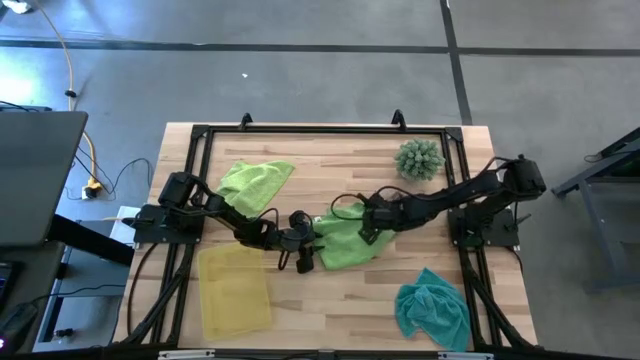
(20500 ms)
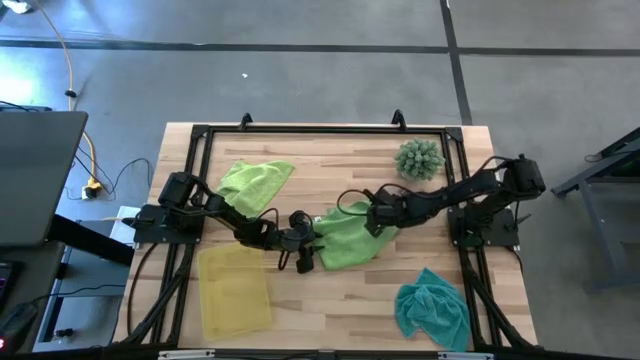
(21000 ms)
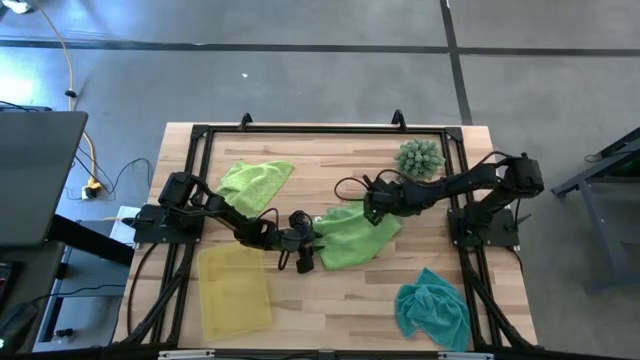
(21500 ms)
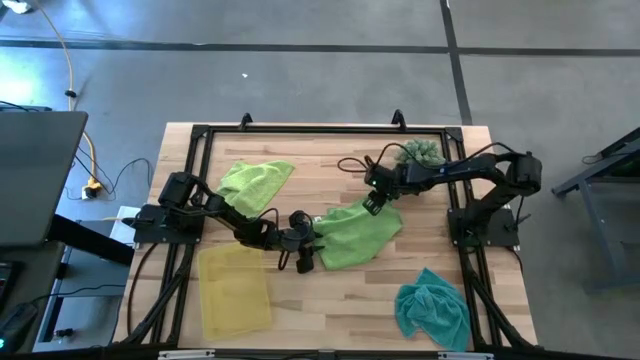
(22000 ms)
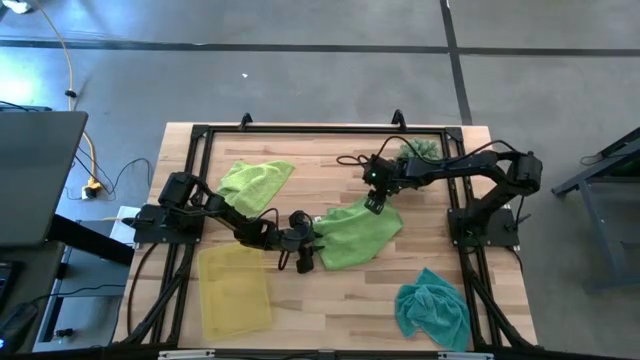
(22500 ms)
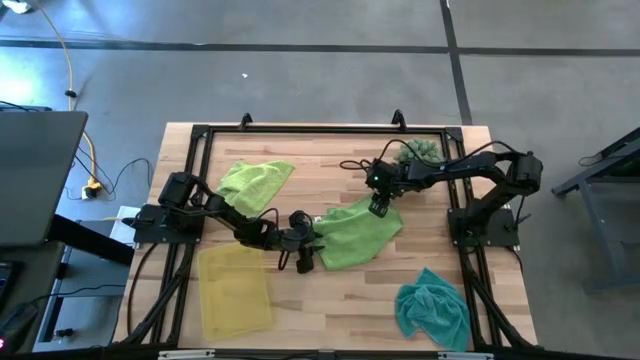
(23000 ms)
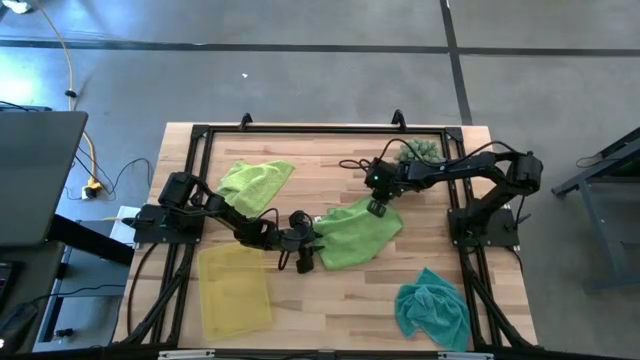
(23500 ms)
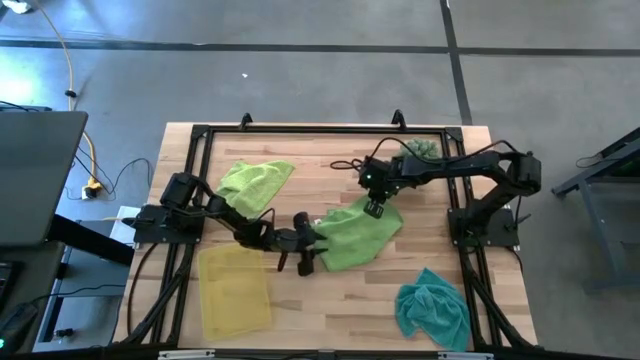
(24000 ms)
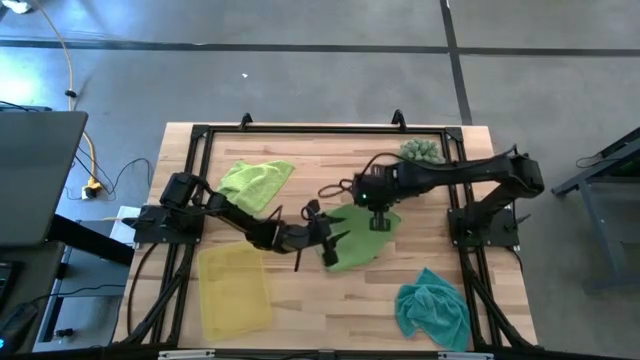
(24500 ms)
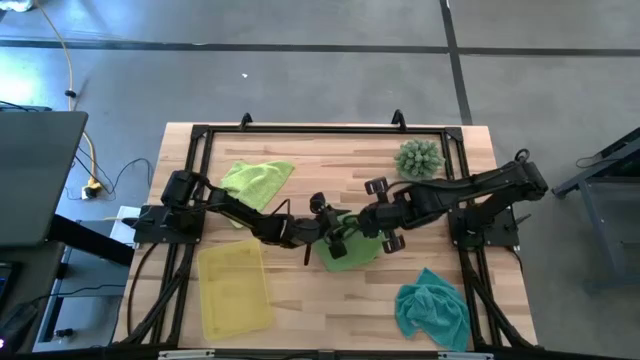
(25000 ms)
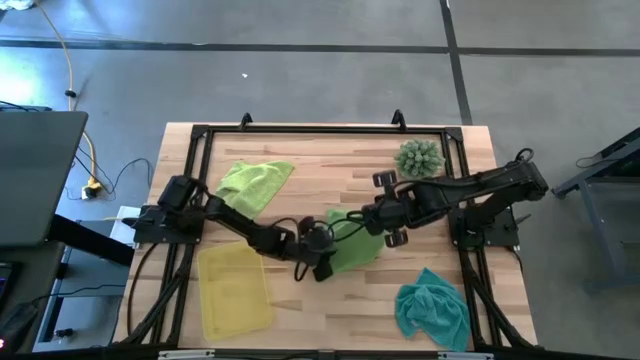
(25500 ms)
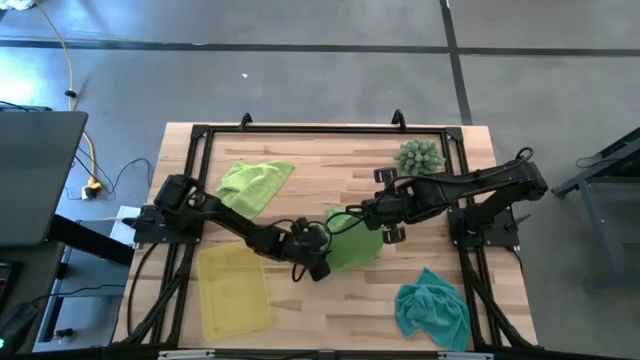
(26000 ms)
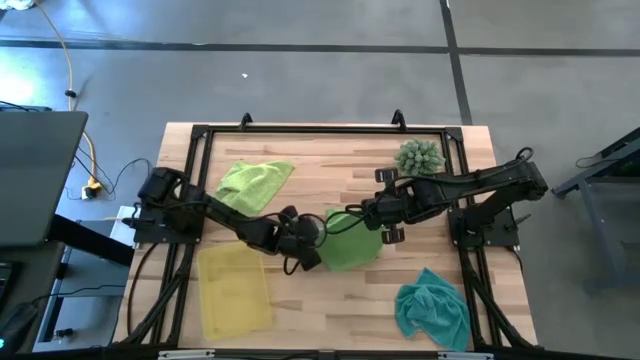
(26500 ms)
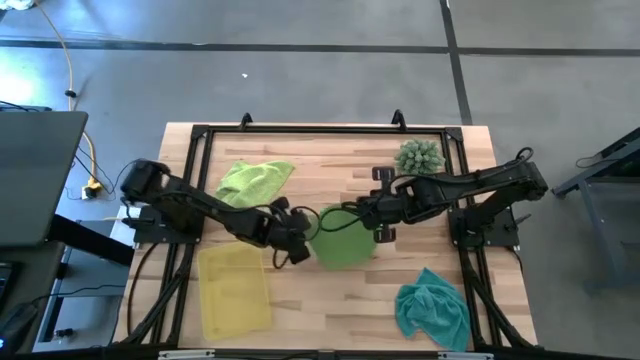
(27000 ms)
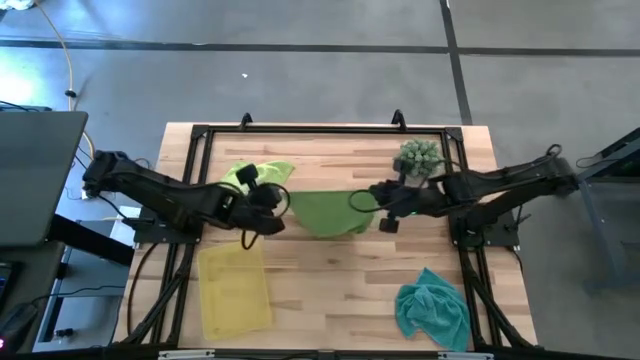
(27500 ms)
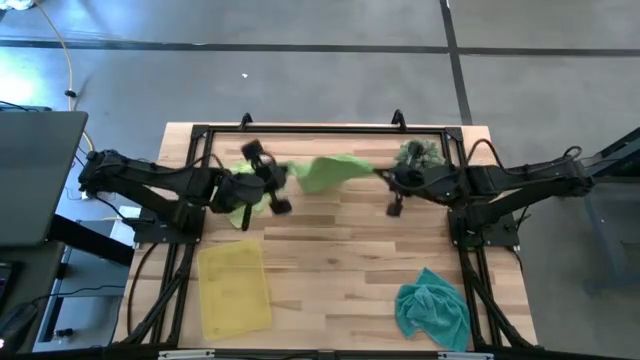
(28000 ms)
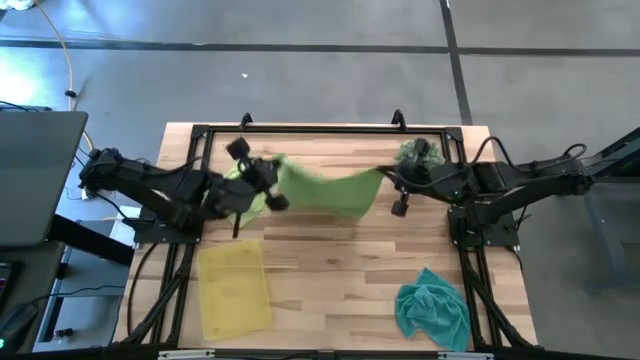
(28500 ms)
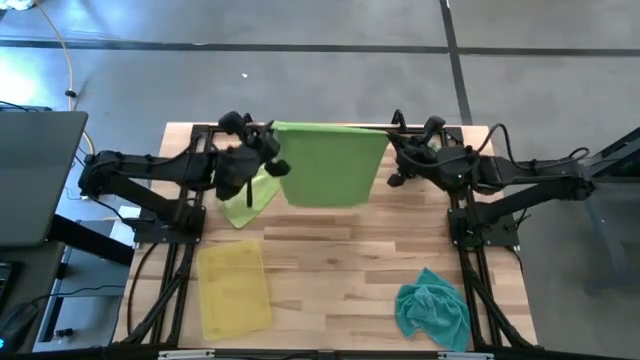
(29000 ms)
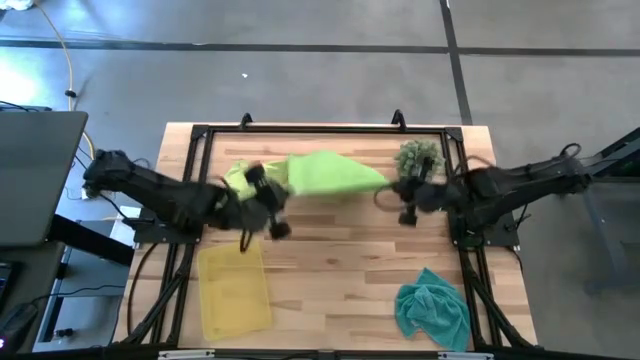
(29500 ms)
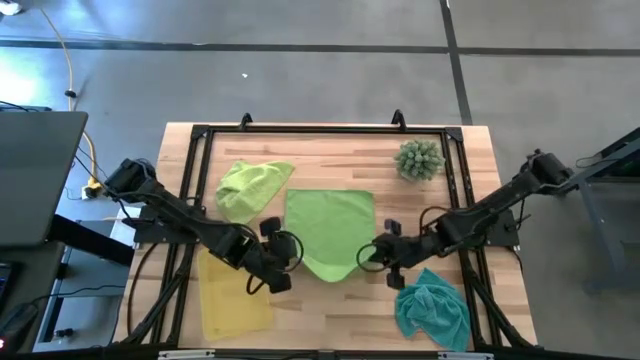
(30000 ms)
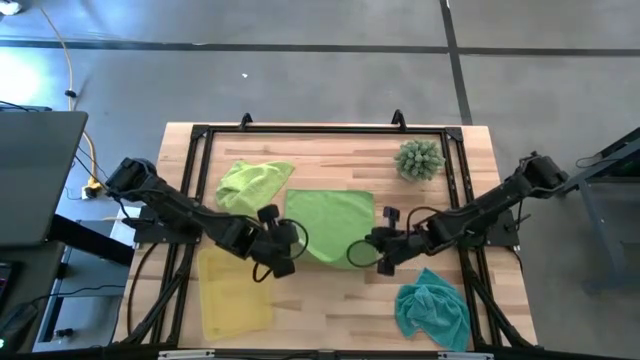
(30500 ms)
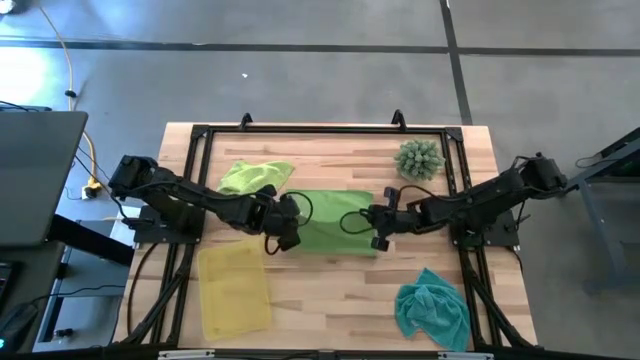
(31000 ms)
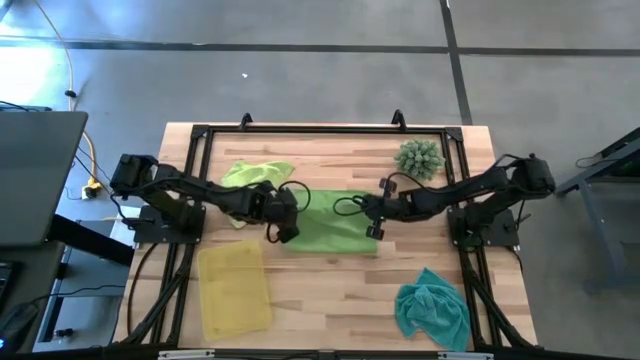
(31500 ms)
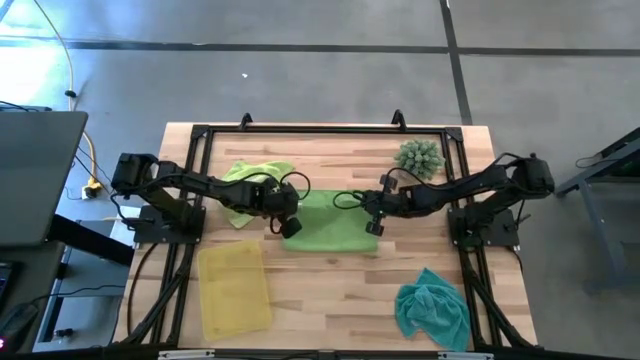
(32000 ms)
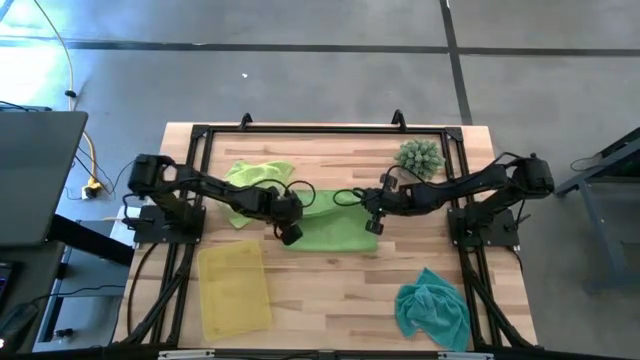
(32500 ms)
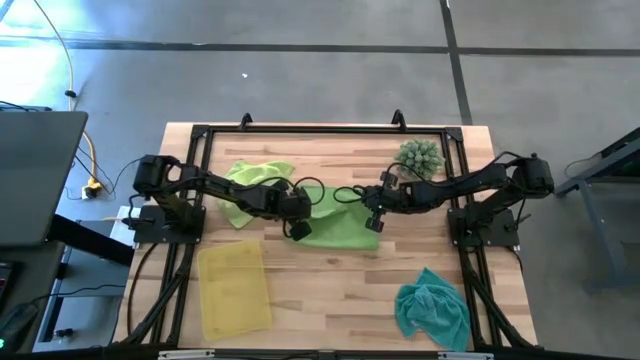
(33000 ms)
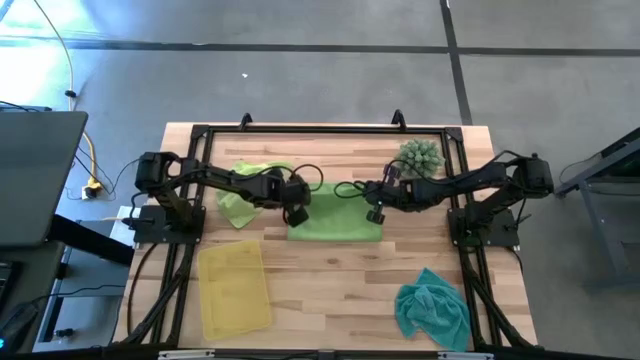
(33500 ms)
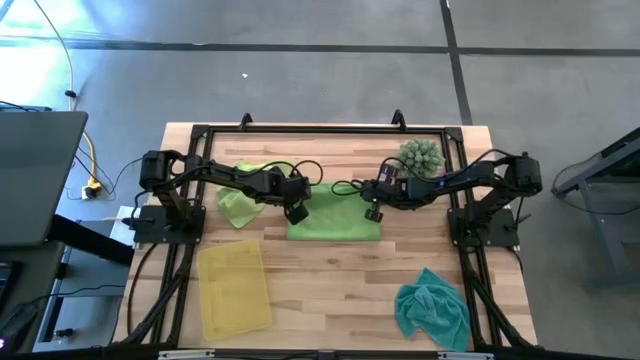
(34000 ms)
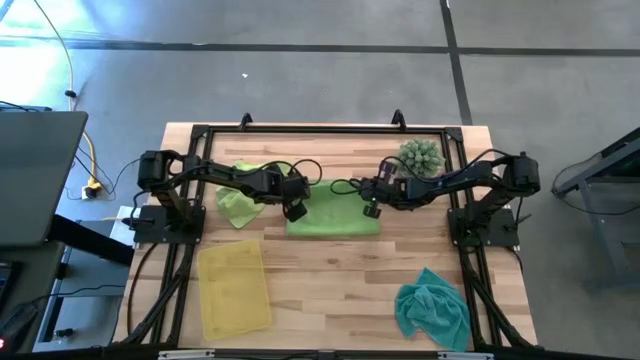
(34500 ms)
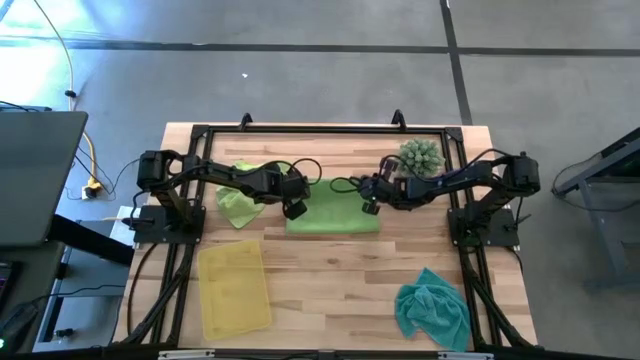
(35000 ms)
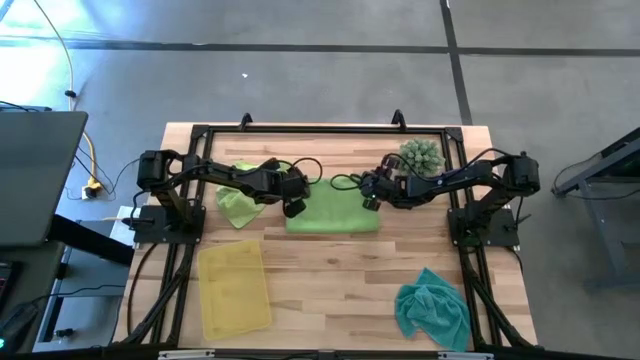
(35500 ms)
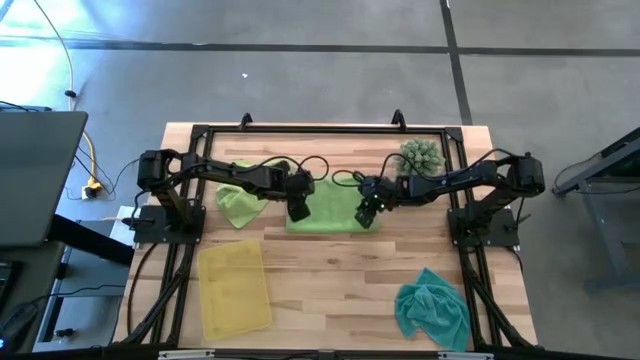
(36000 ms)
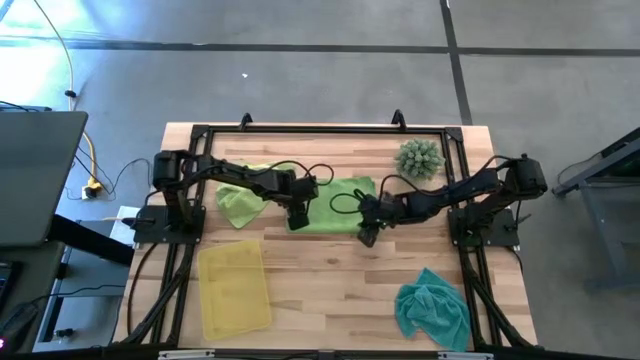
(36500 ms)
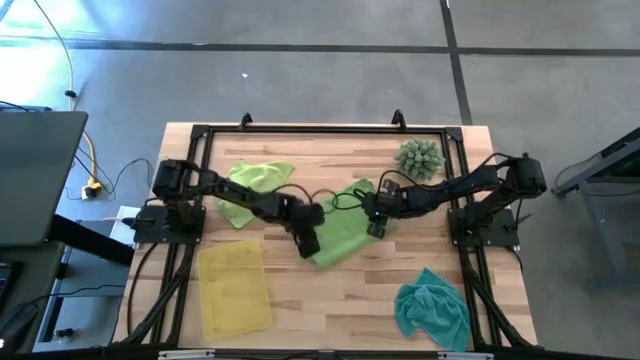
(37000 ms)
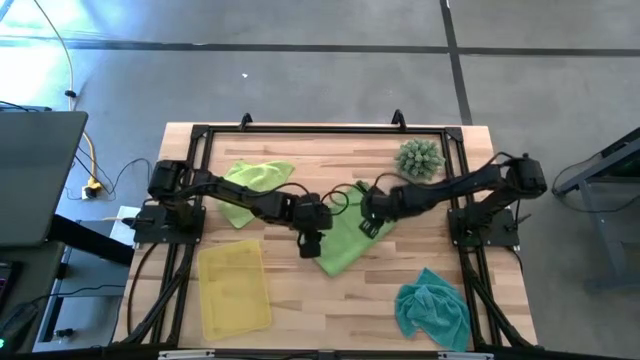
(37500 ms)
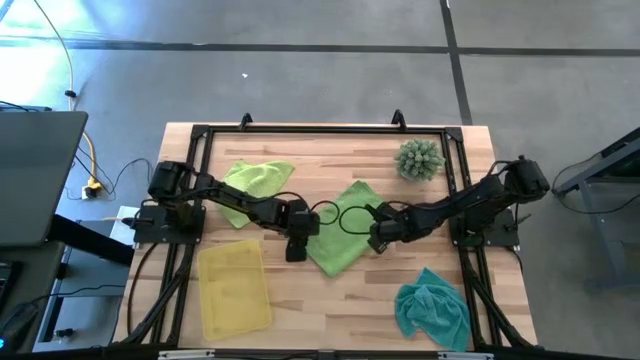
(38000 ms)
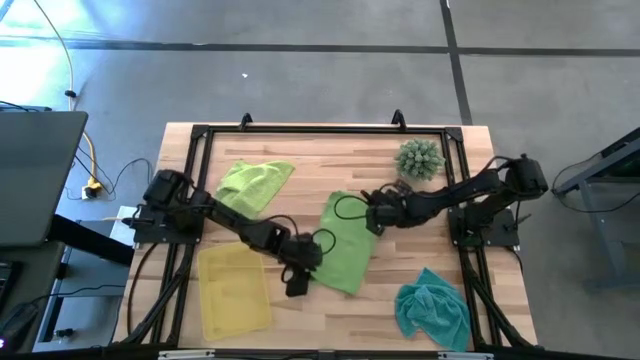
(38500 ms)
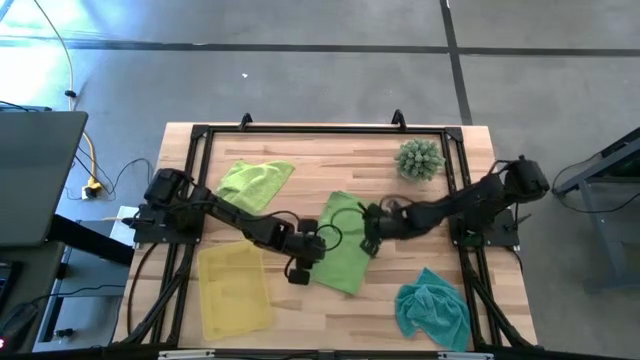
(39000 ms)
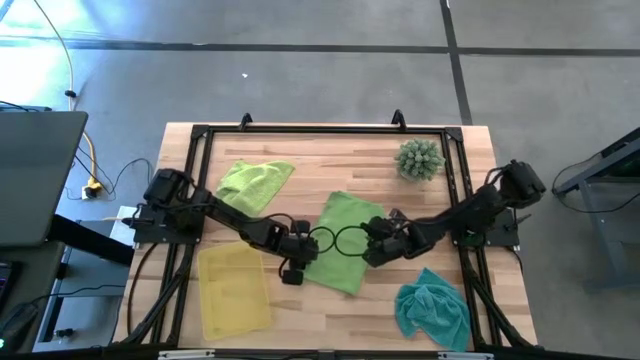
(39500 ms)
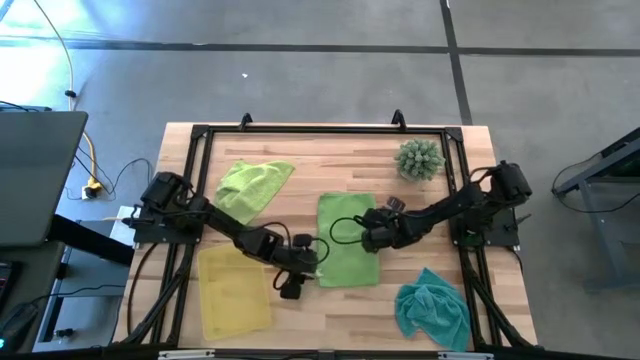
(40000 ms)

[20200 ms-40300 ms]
Task: Roll microfiber towels into tight, uniform cylinder then place into a basket
Fold the green microfiber towel

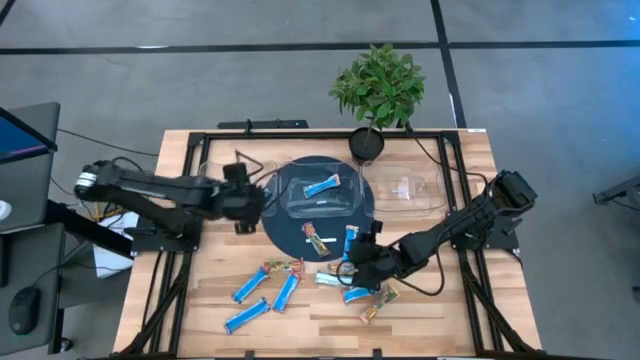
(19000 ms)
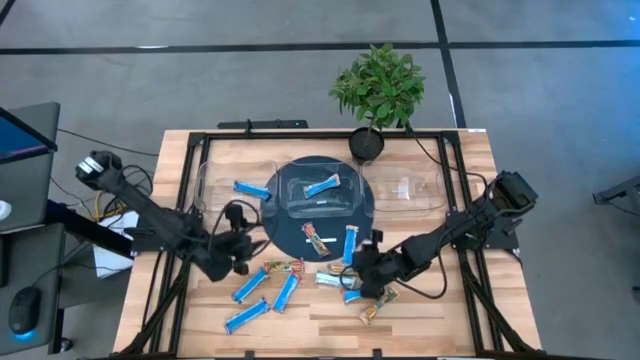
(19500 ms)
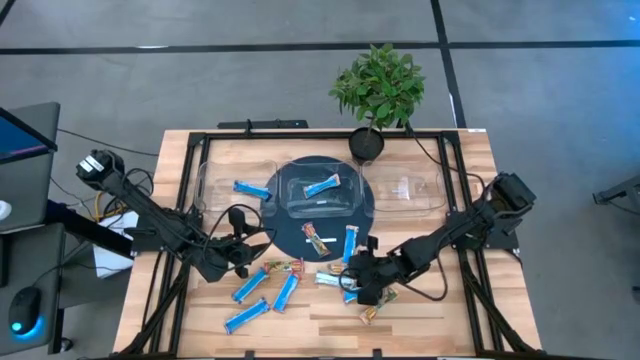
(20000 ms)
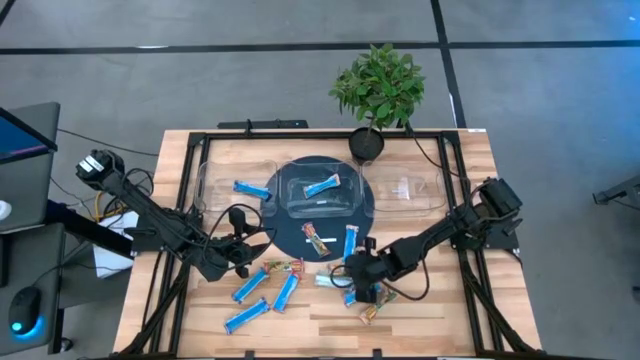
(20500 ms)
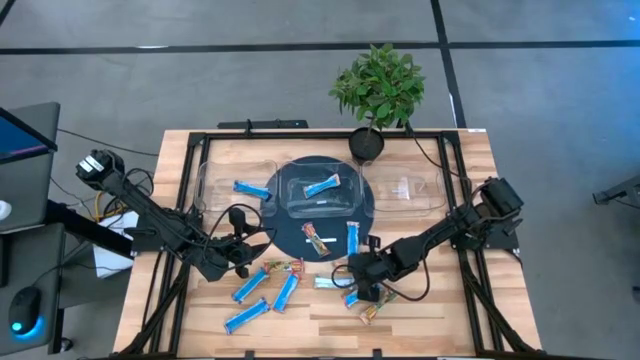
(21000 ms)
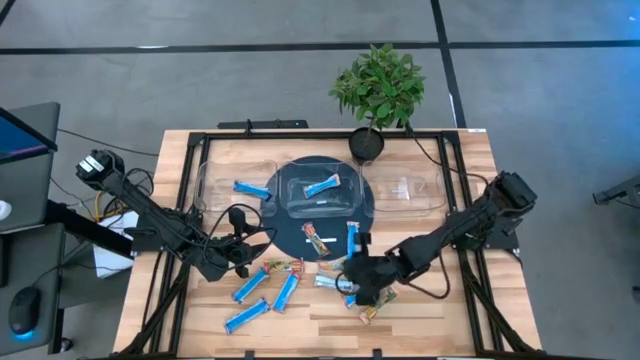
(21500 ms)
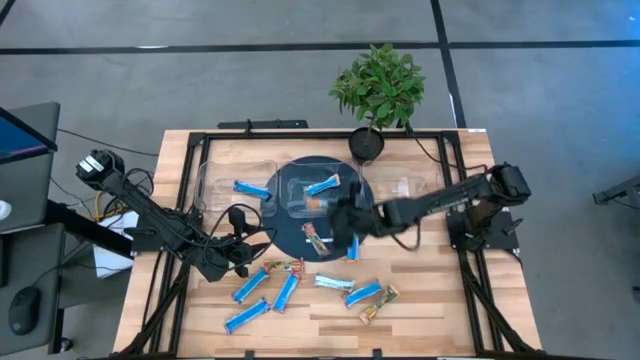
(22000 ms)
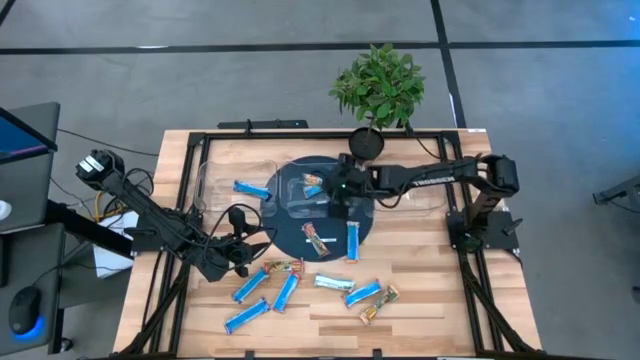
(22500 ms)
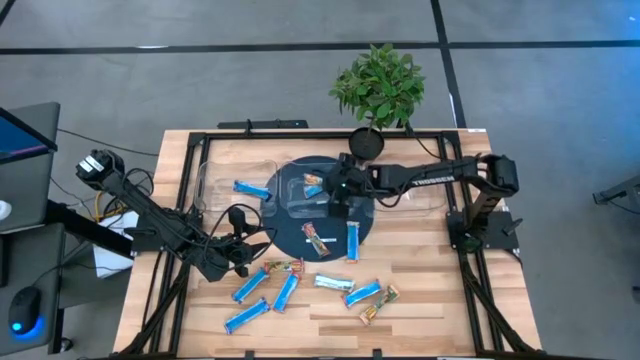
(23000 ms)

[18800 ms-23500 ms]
Task: Pick and place Granola Bars by type
Put the orange snack bar into the middle transparent bin
